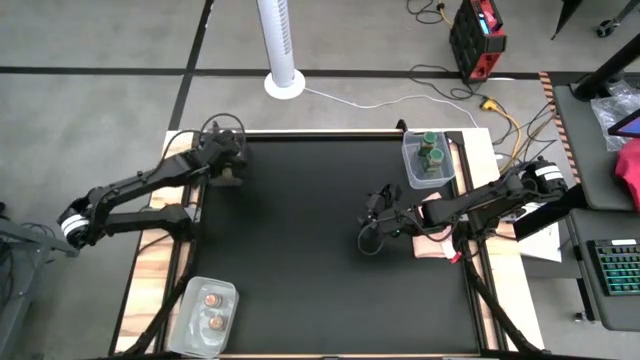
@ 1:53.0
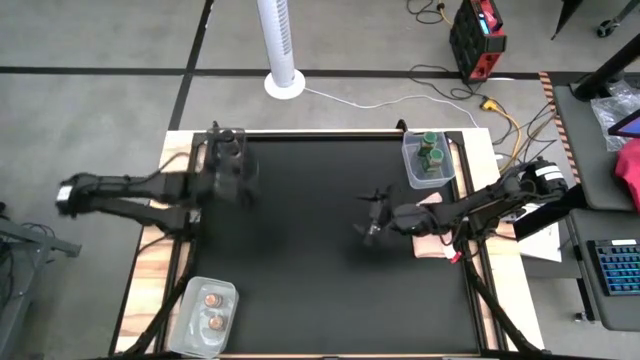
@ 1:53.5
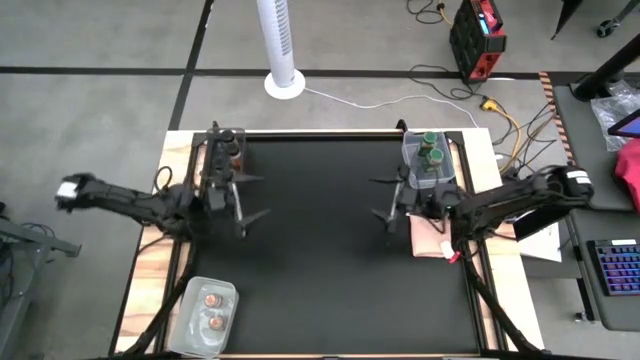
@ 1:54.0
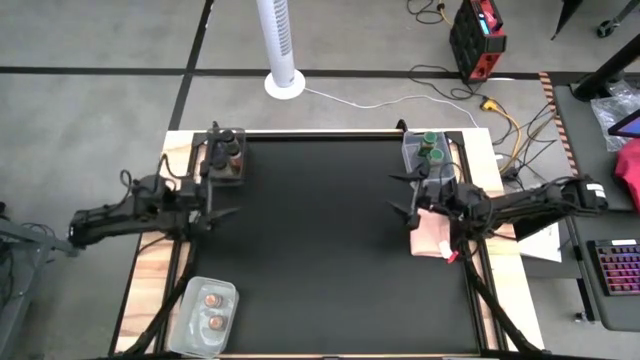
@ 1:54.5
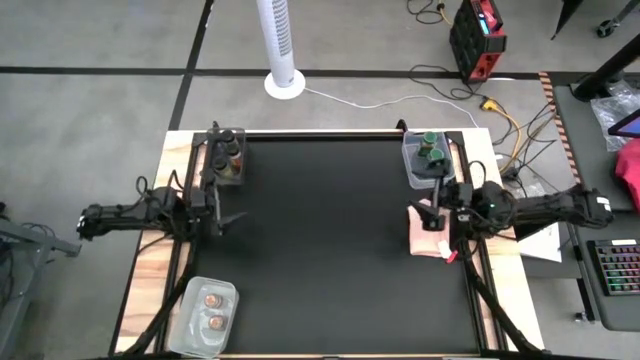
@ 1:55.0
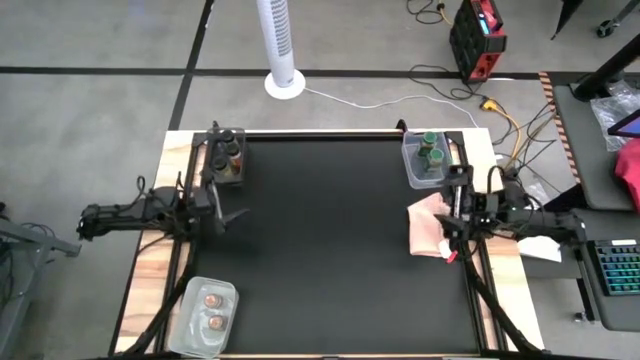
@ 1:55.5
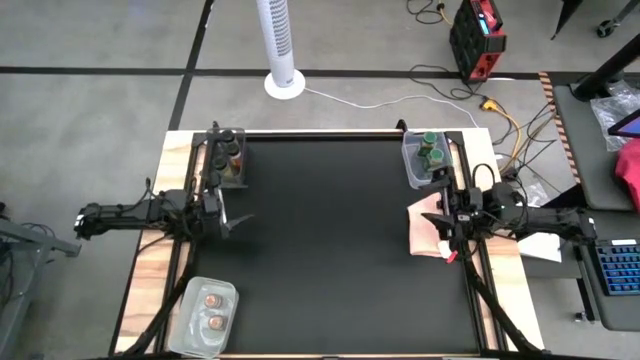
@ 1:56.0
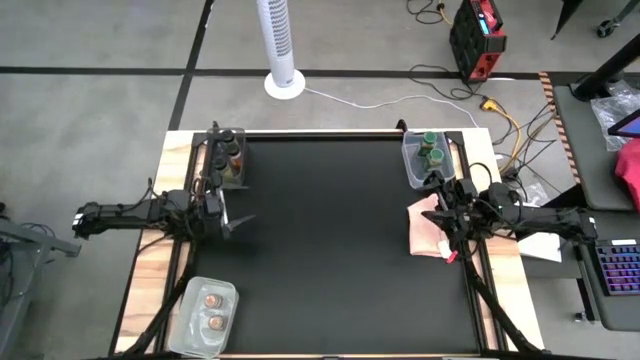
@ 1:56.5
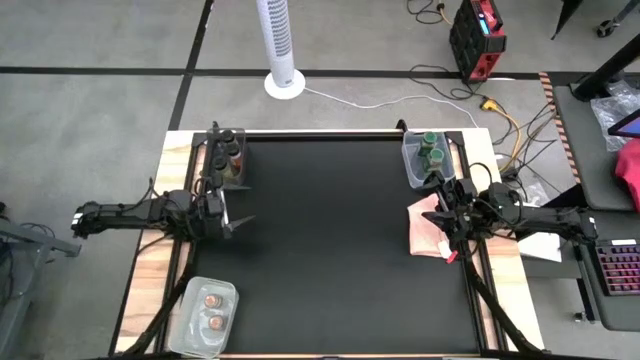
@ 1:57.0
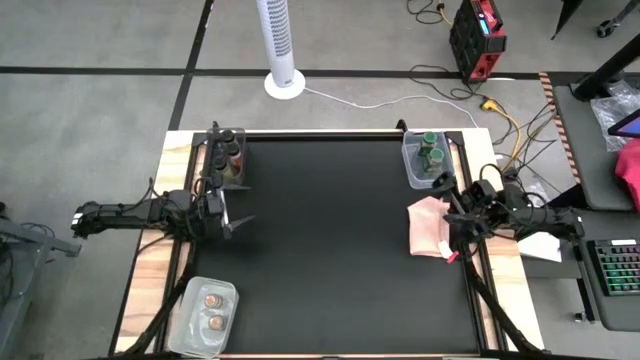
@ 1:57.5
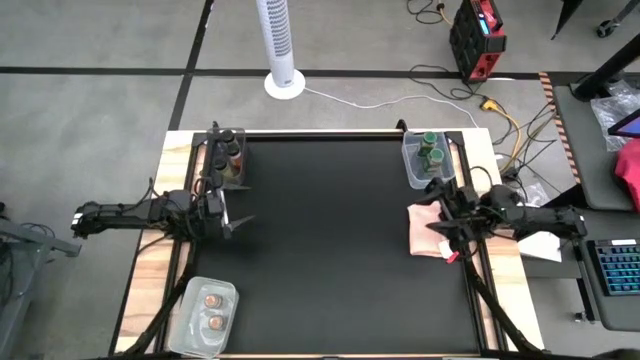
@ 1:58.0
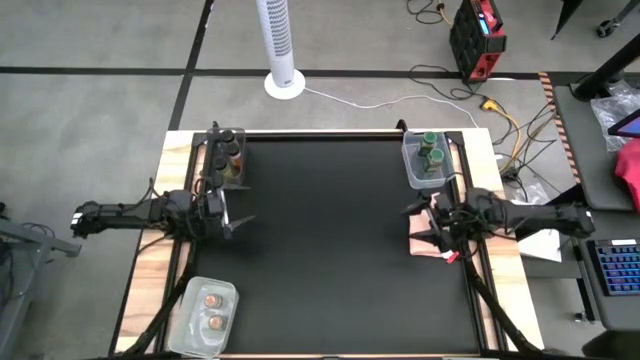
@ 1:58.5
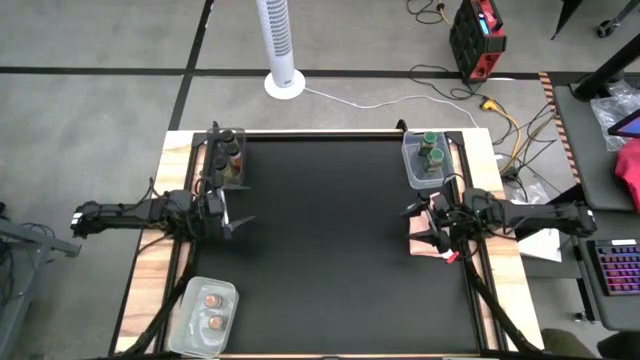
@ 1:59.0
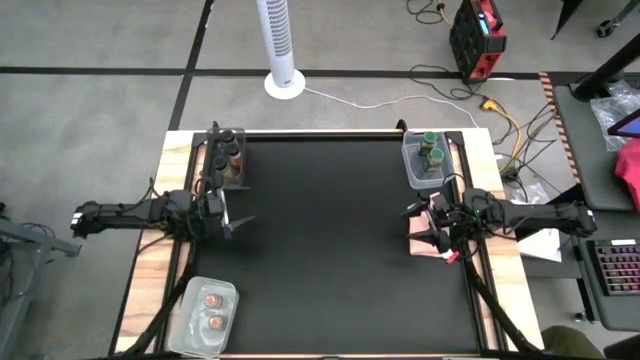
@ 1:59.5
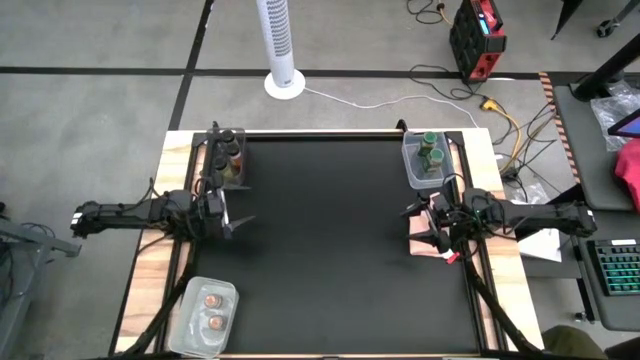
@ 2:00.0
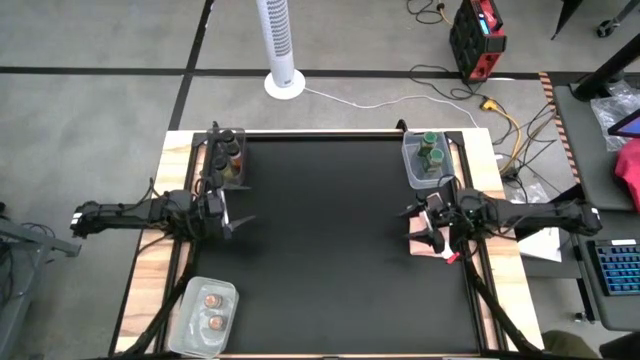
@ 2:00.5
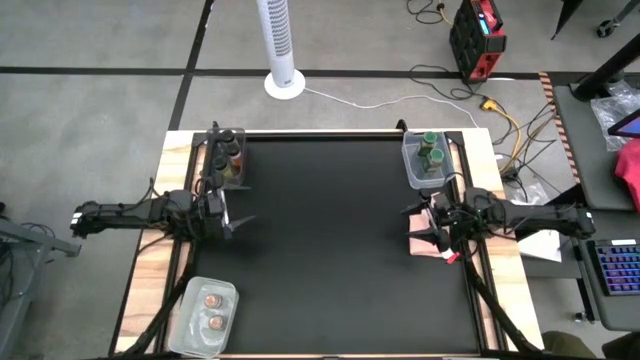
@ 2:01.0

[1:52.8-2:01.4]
Task: Sort spices by type
Return to Home Position

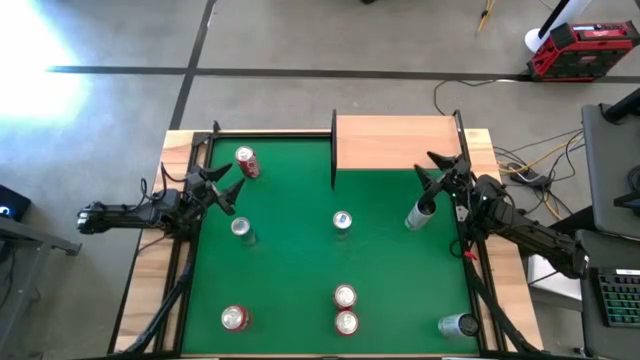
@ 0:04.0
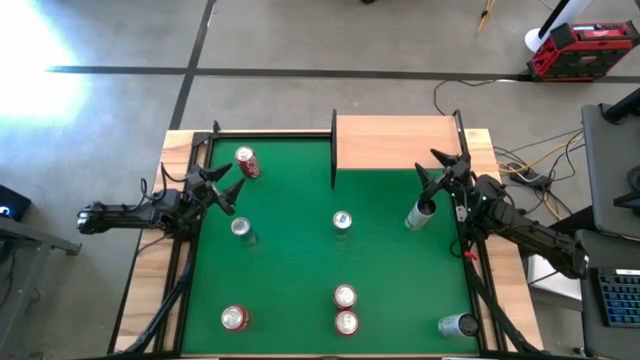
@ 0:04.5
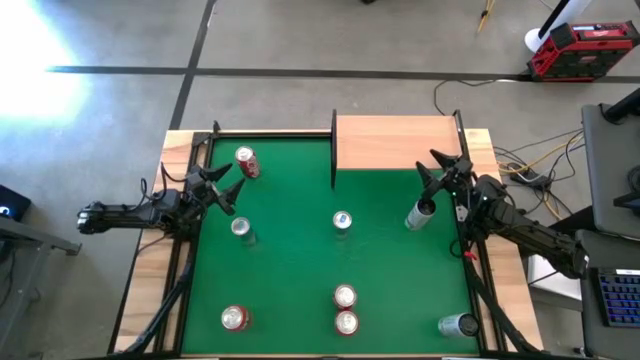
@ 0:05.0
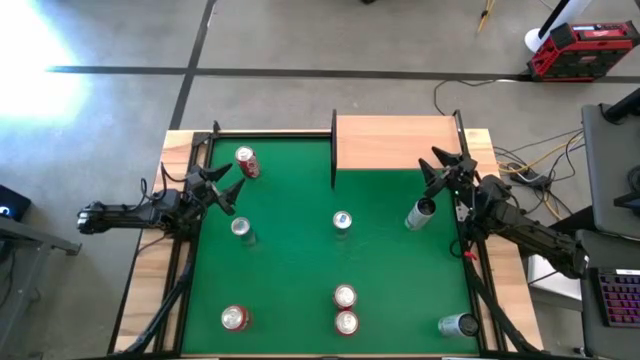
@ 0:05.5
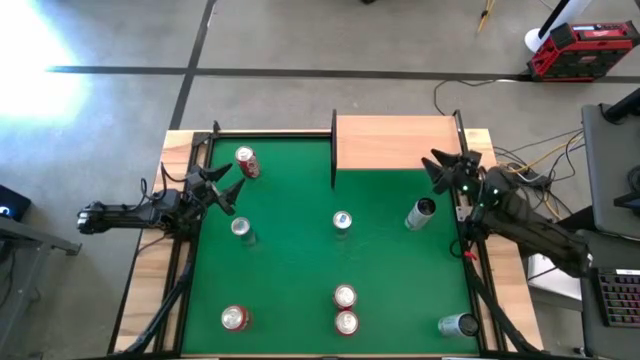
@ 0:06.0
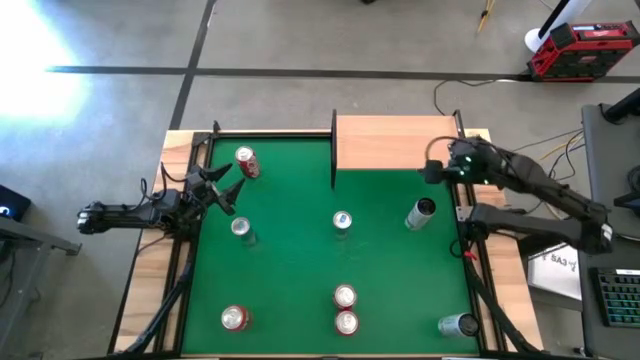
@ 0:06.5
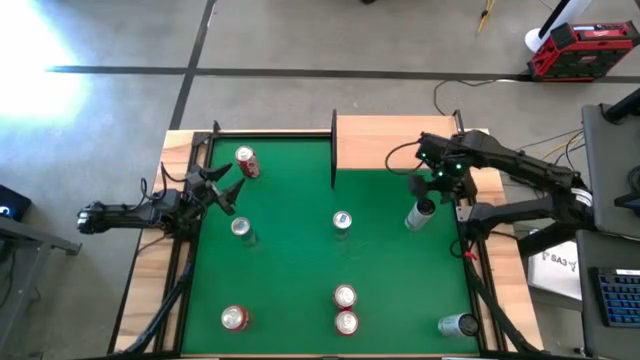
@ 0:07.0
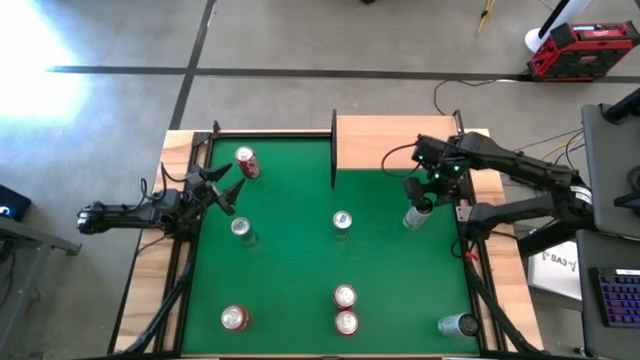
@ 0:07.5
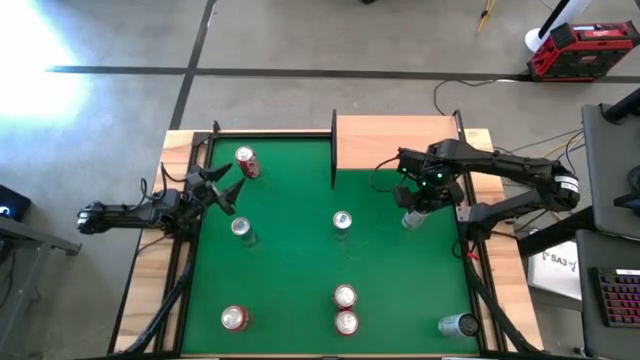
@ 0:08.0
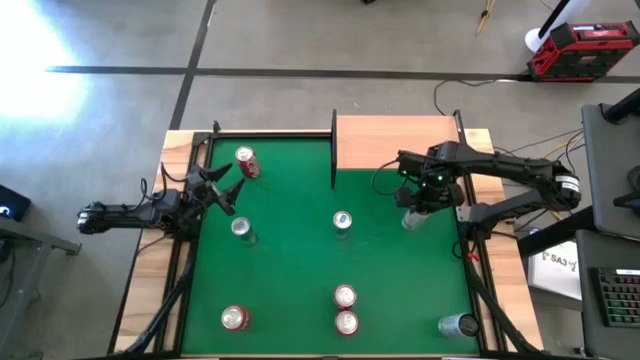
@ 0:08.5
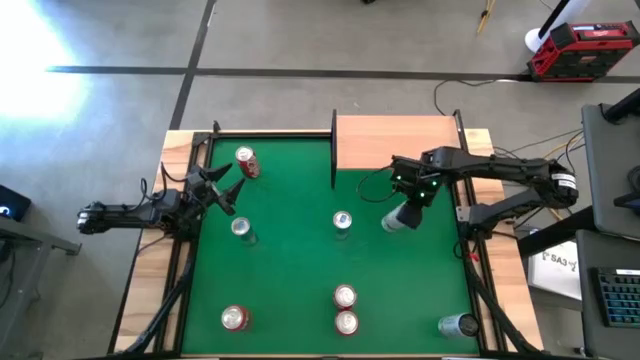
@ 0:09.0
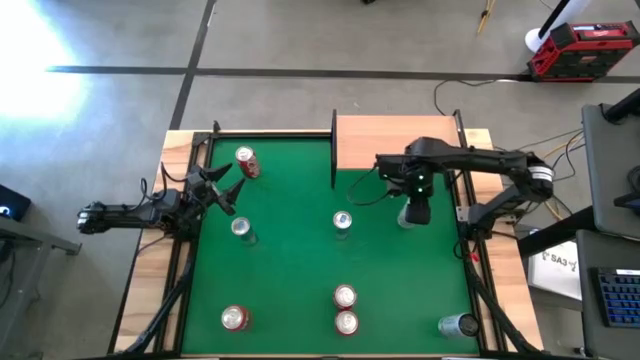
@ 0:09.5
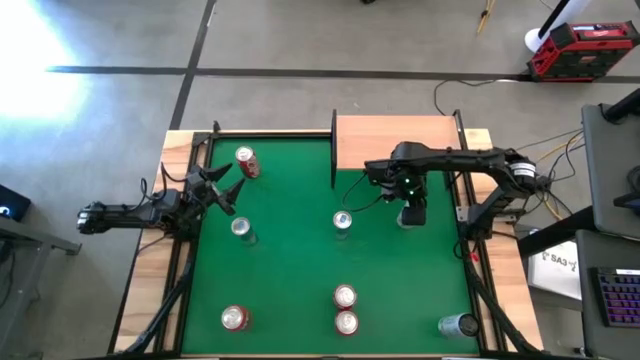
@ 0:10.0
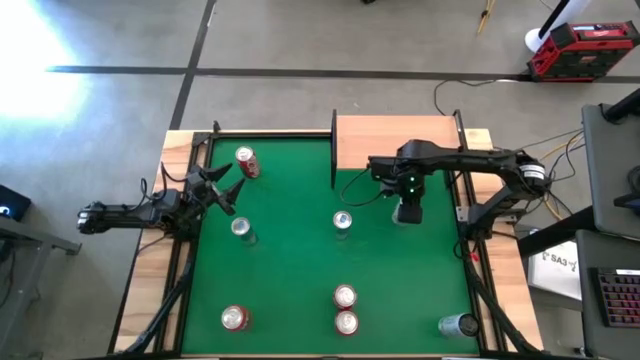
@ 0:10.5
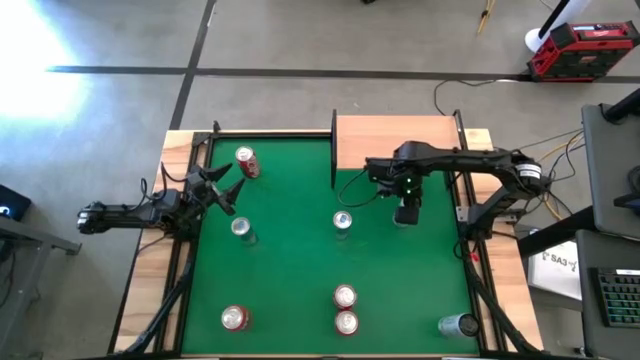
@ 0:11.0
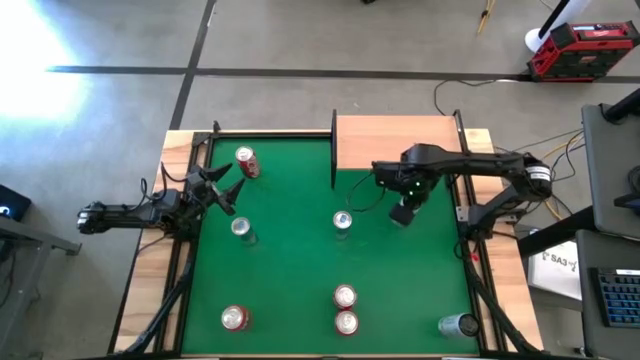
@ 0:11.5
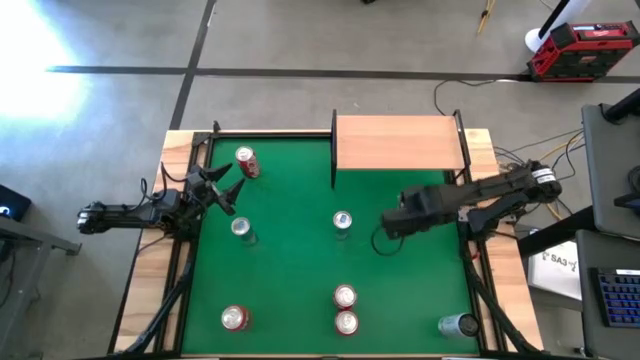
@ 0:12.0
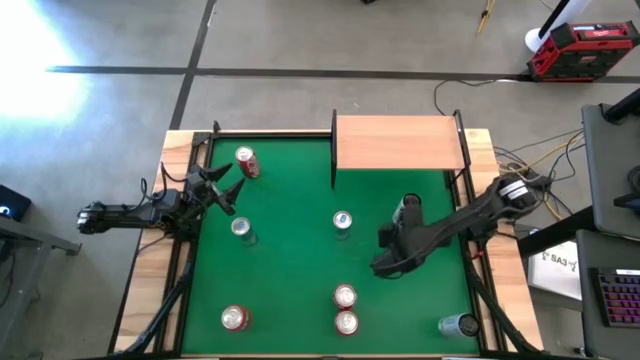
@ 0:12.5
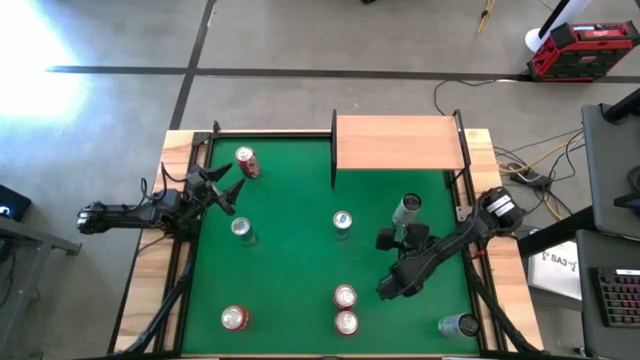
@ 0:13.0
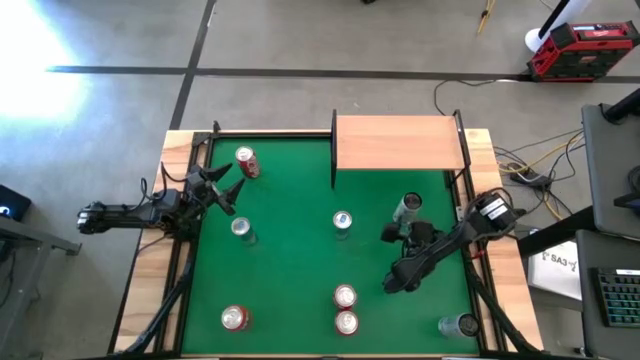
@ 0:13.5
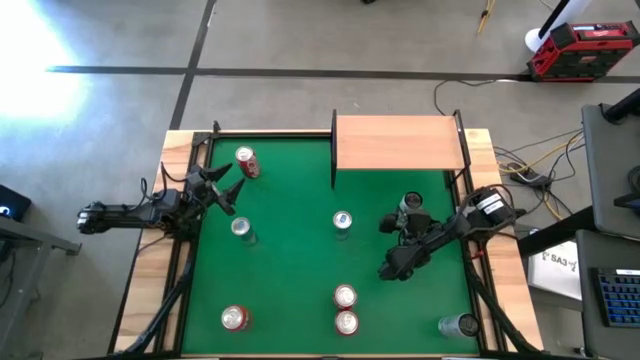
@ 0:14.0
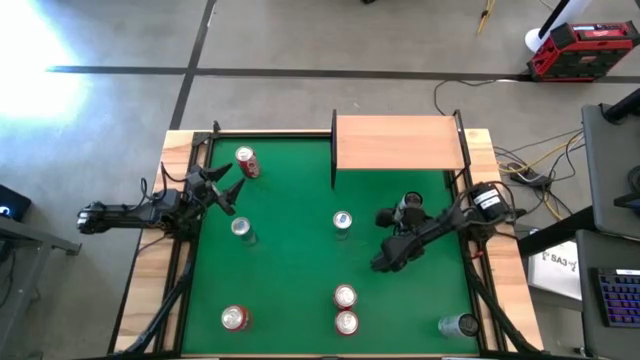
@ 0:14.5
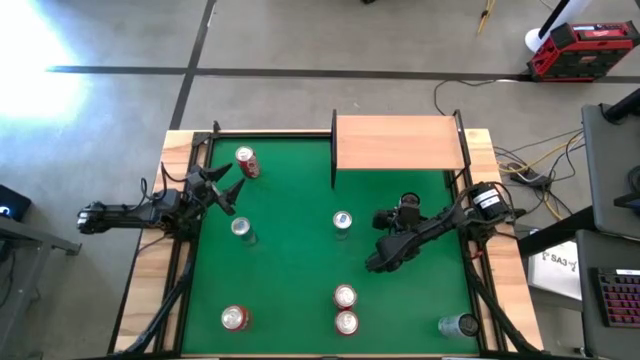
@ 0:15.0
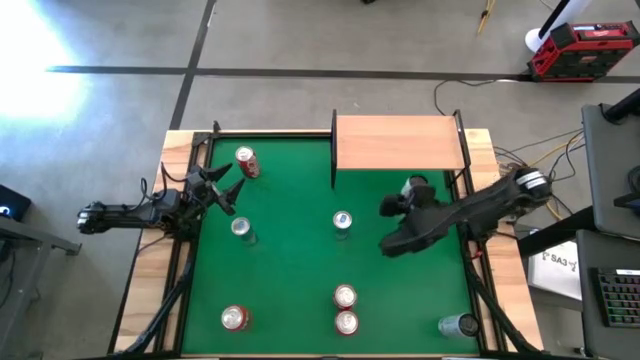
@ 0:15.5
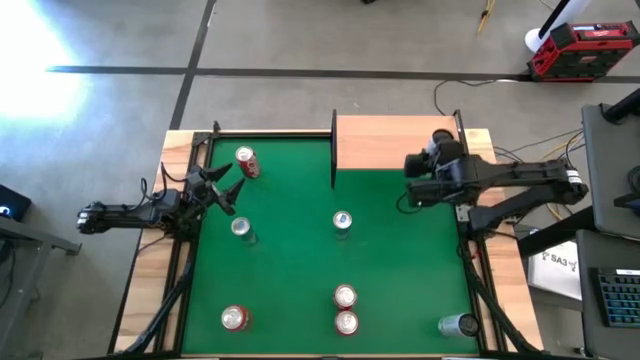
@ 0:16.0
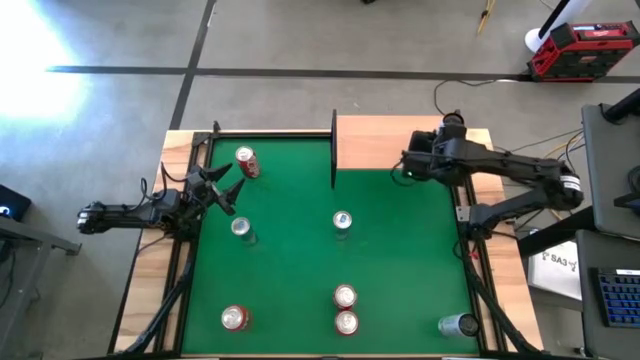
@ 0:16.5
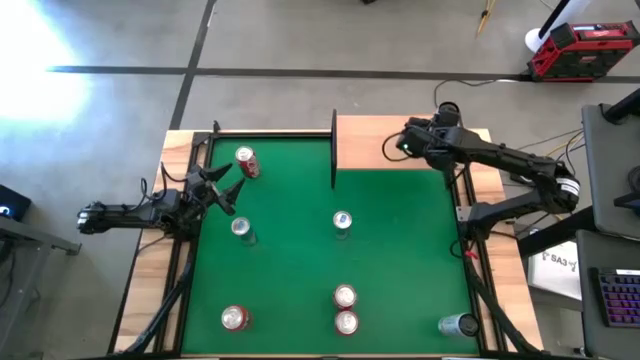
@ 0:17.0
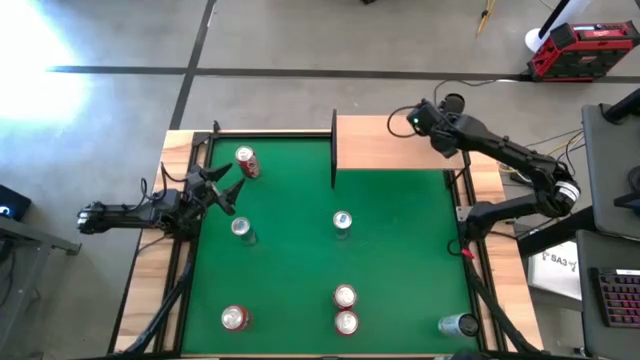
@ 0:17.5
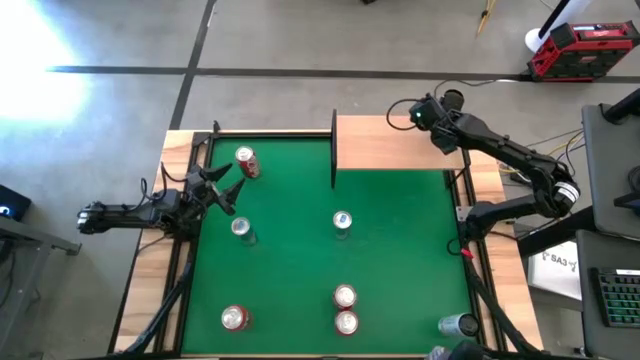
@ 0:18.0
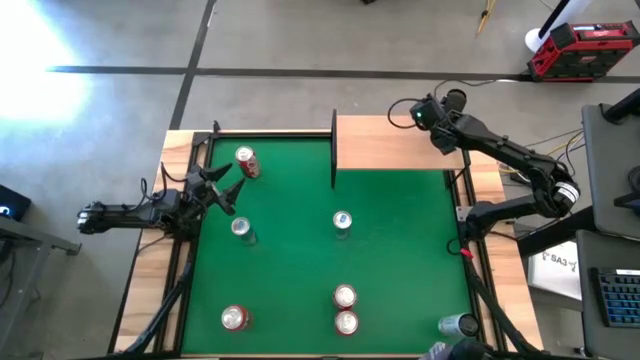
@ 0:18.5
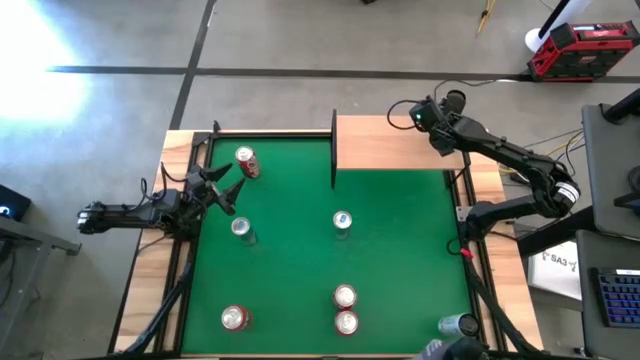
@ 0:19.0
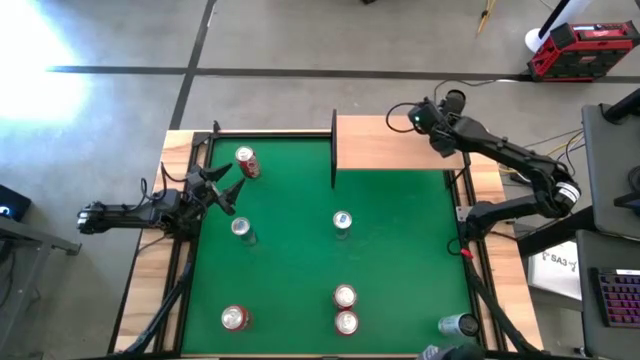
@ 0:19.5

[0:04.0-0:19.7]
Task: Place canned beverage on shelf
Put the top white yellow soda can on the shelf
